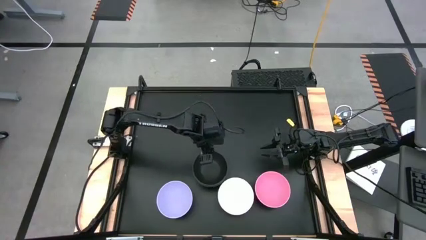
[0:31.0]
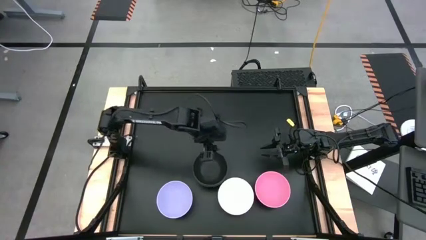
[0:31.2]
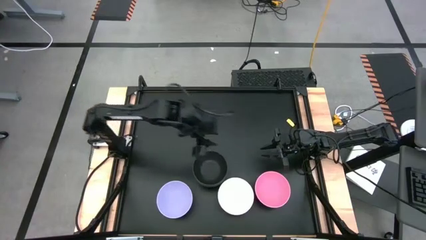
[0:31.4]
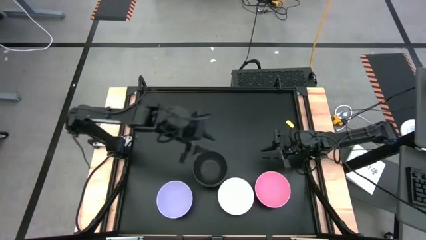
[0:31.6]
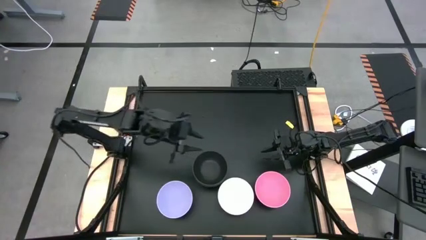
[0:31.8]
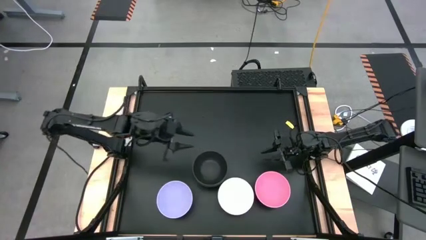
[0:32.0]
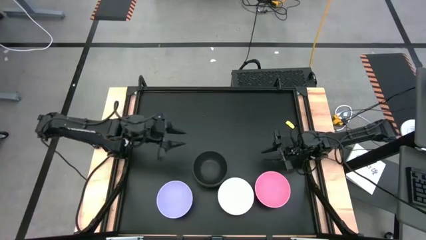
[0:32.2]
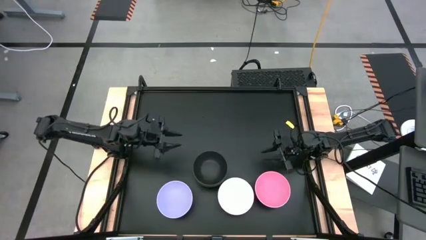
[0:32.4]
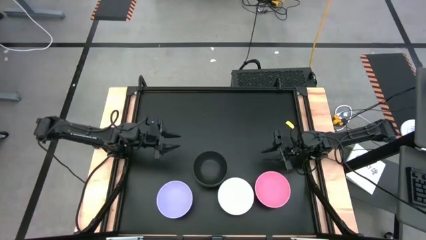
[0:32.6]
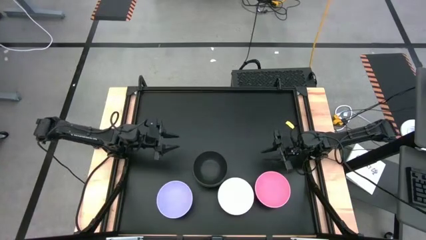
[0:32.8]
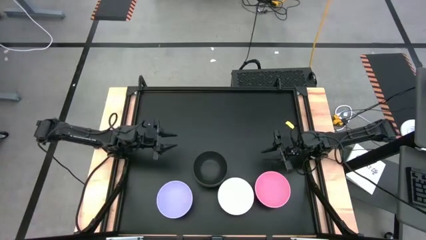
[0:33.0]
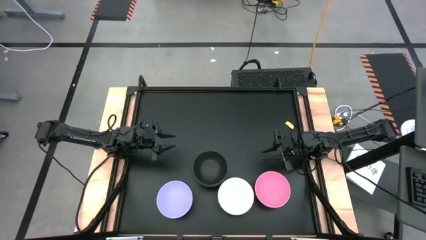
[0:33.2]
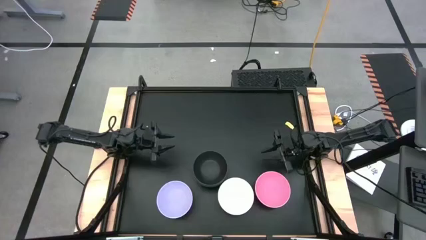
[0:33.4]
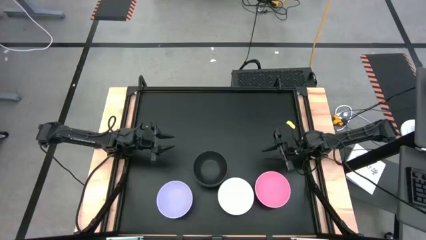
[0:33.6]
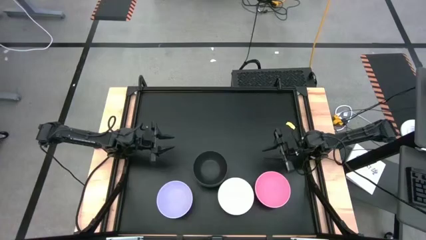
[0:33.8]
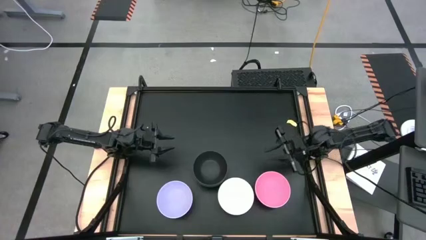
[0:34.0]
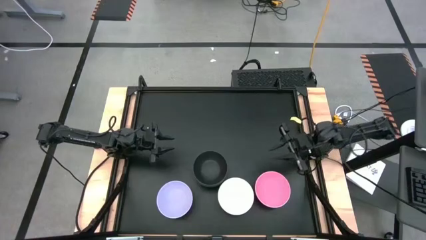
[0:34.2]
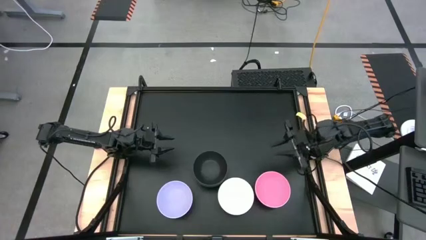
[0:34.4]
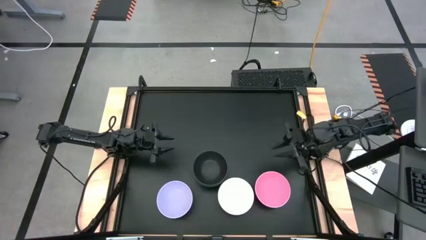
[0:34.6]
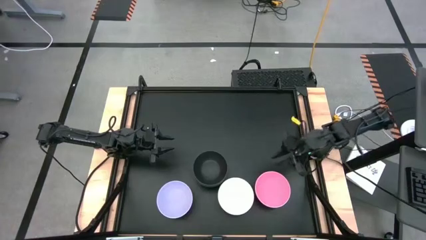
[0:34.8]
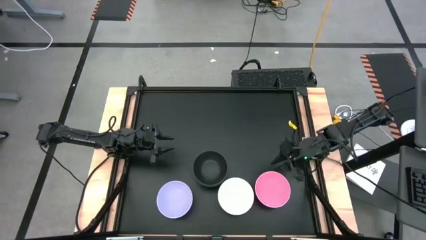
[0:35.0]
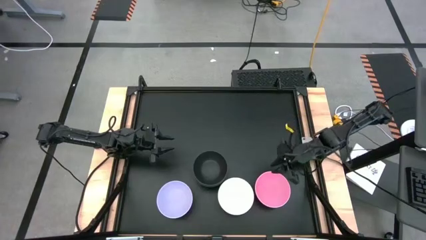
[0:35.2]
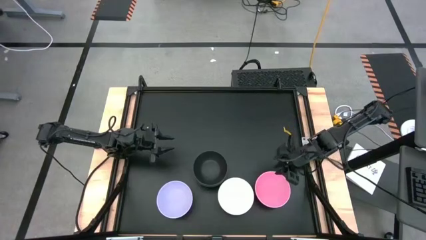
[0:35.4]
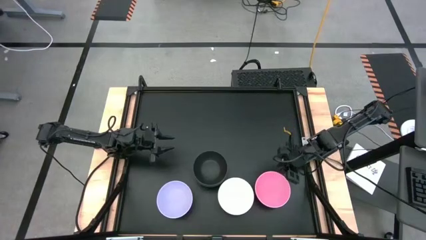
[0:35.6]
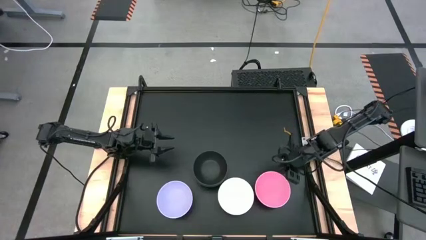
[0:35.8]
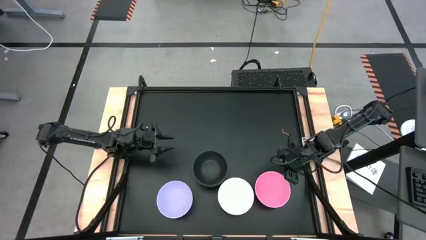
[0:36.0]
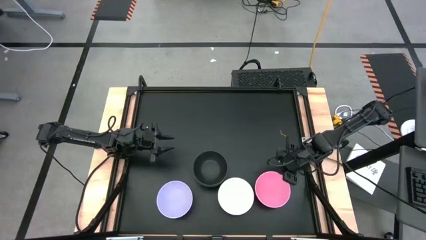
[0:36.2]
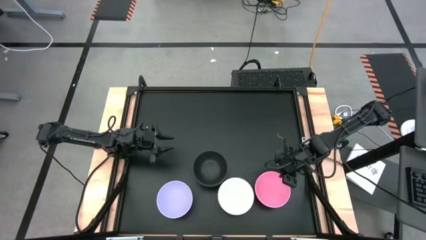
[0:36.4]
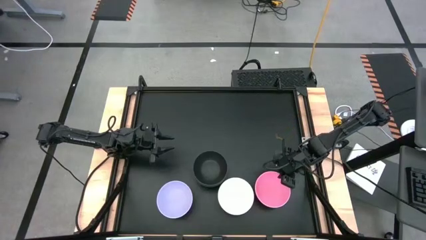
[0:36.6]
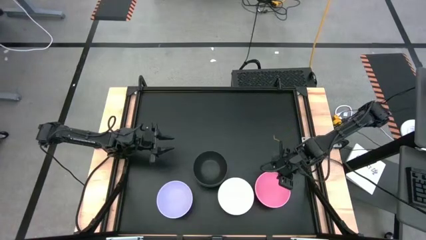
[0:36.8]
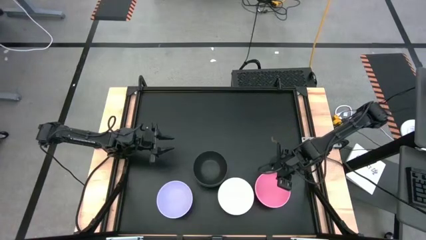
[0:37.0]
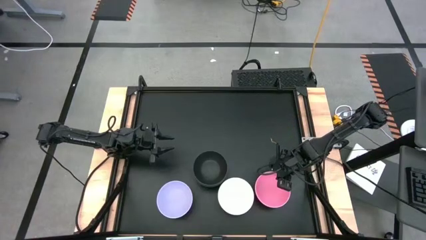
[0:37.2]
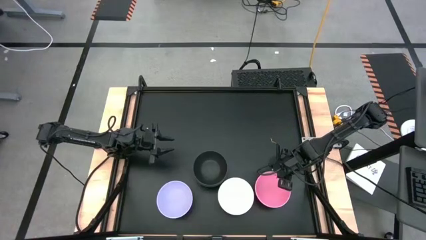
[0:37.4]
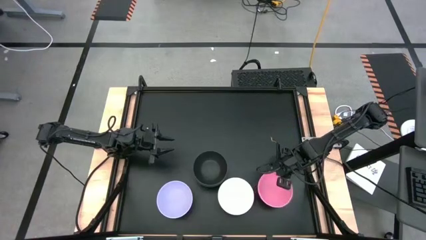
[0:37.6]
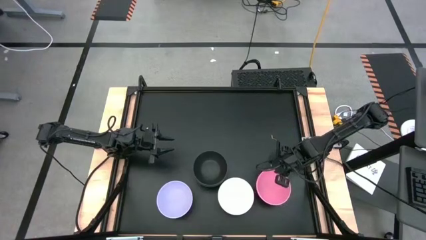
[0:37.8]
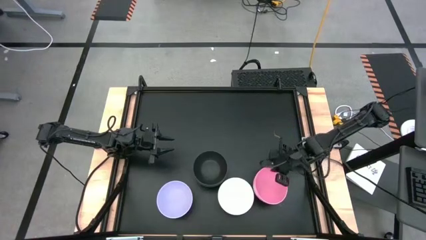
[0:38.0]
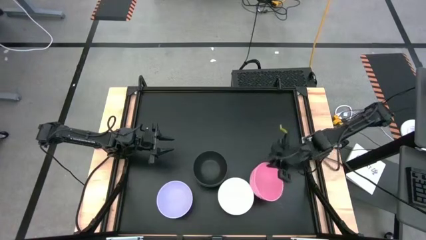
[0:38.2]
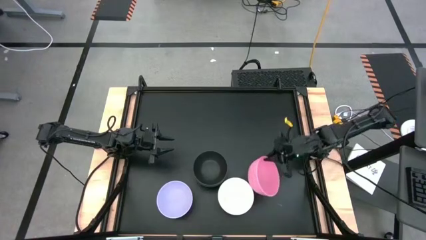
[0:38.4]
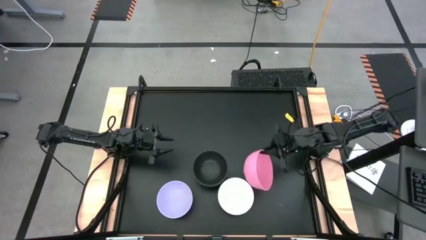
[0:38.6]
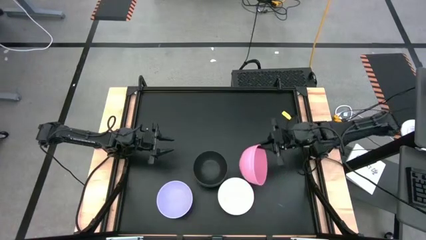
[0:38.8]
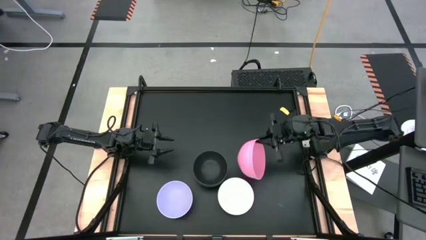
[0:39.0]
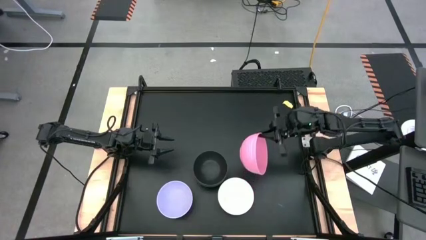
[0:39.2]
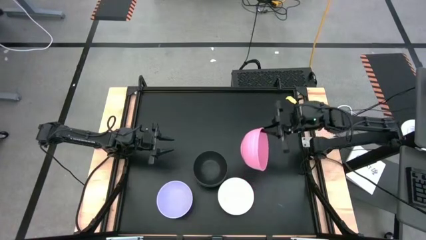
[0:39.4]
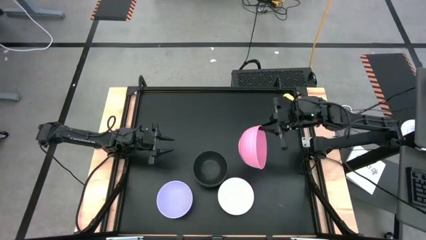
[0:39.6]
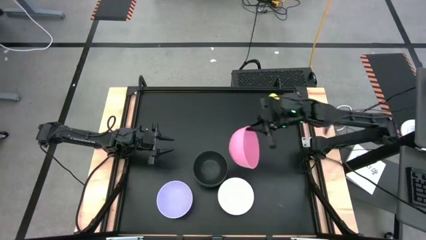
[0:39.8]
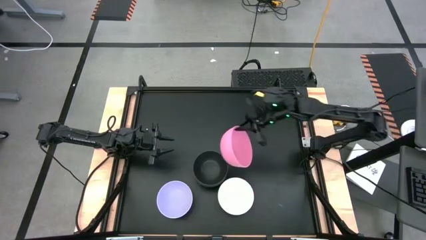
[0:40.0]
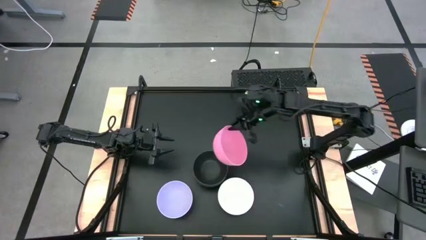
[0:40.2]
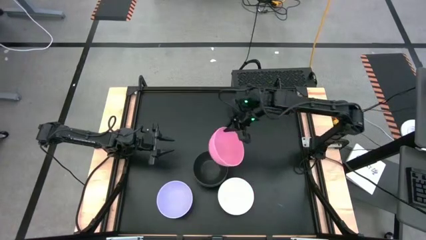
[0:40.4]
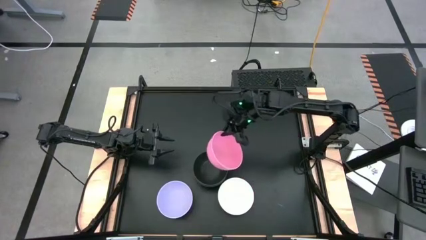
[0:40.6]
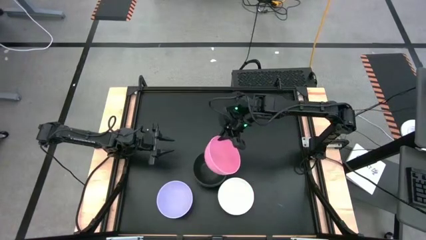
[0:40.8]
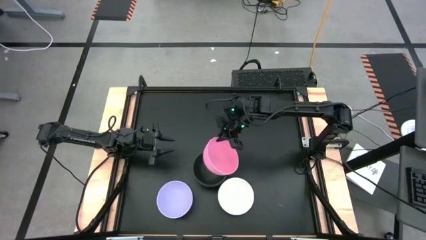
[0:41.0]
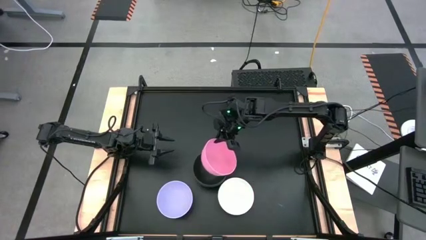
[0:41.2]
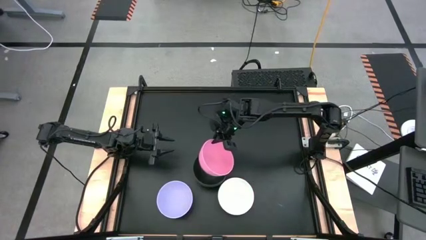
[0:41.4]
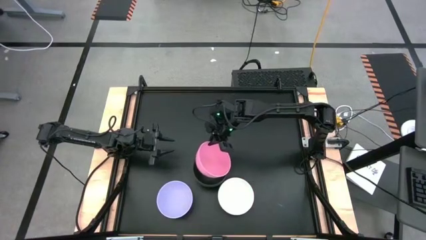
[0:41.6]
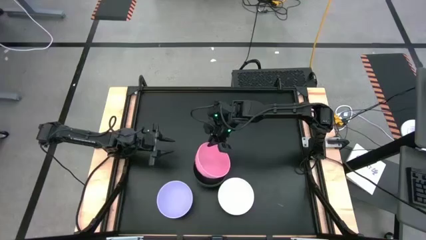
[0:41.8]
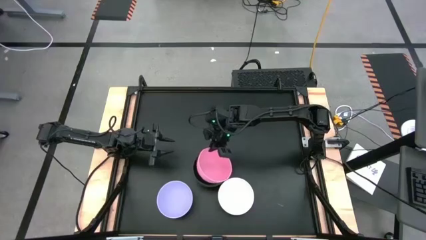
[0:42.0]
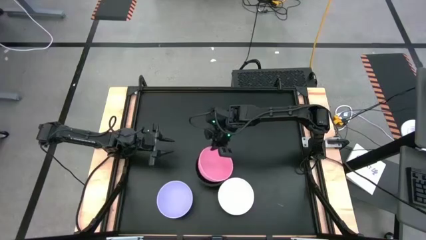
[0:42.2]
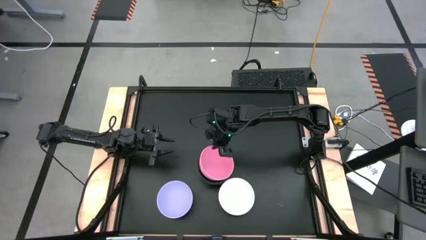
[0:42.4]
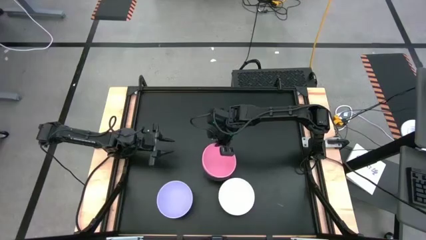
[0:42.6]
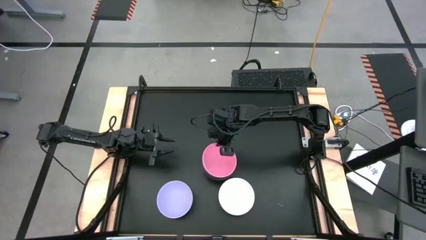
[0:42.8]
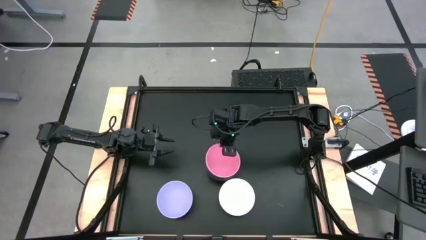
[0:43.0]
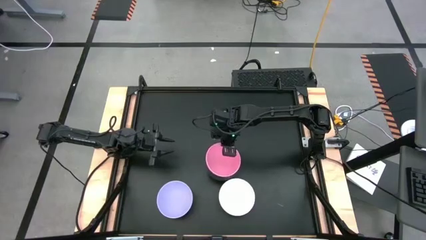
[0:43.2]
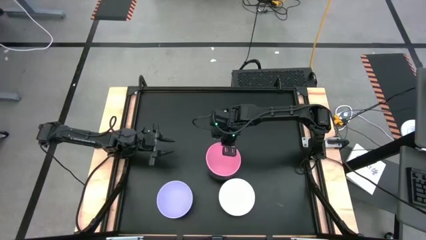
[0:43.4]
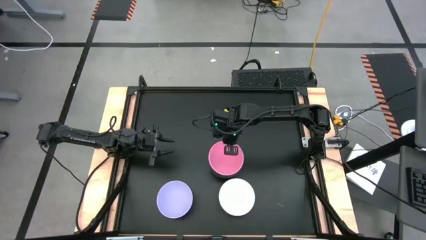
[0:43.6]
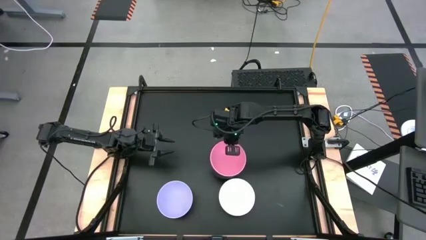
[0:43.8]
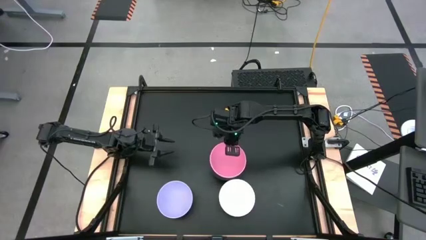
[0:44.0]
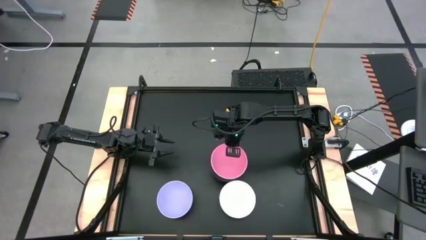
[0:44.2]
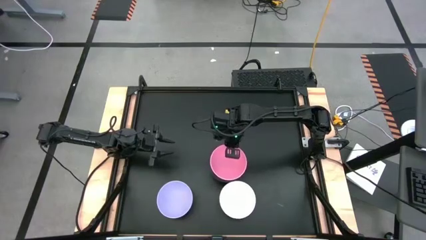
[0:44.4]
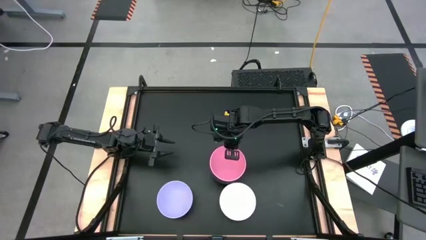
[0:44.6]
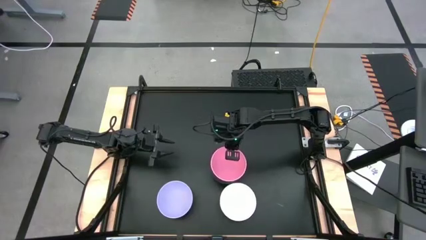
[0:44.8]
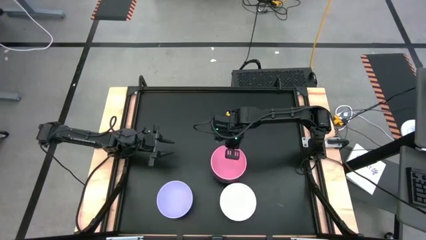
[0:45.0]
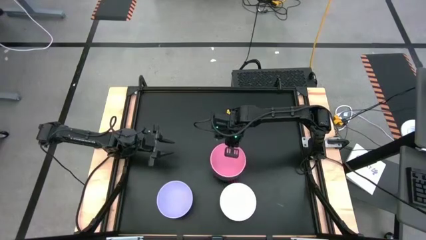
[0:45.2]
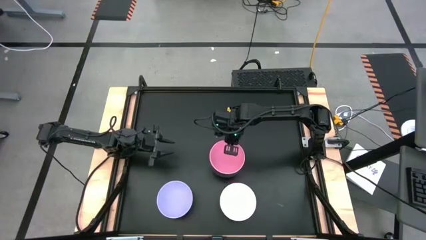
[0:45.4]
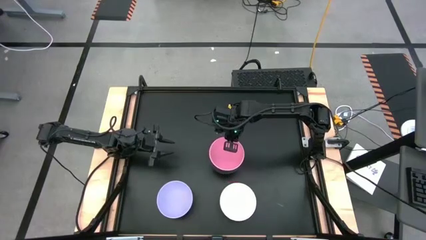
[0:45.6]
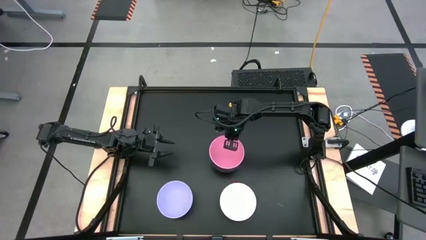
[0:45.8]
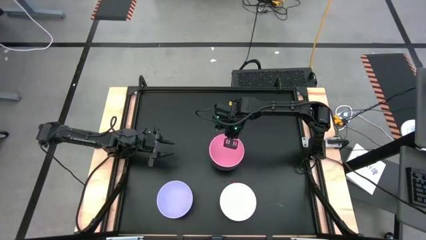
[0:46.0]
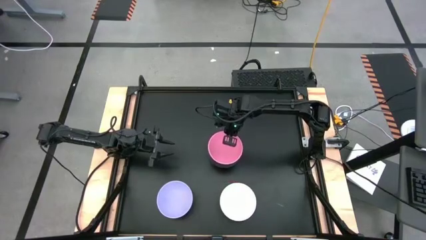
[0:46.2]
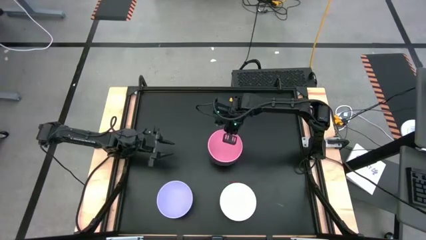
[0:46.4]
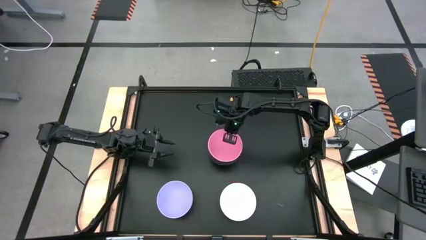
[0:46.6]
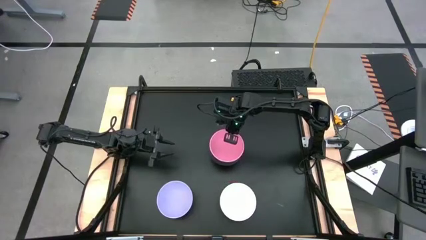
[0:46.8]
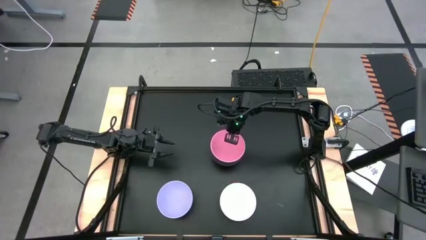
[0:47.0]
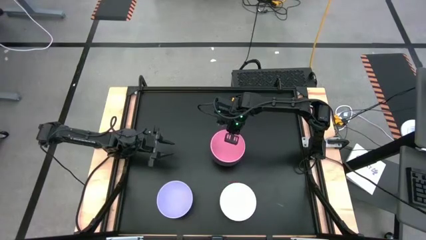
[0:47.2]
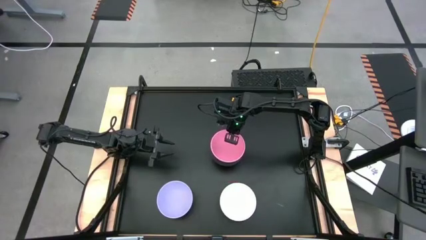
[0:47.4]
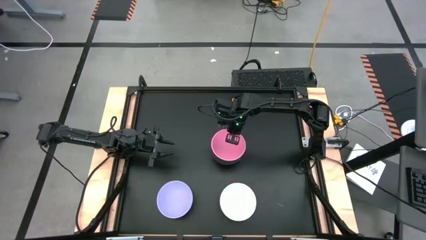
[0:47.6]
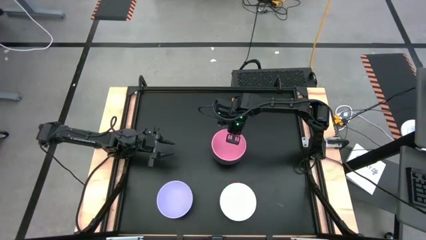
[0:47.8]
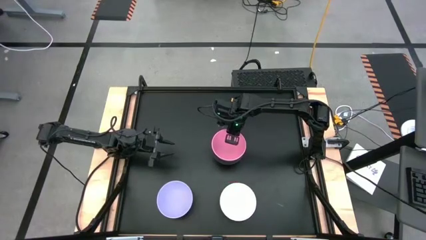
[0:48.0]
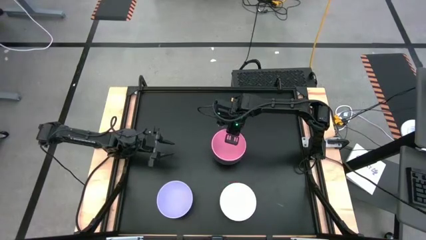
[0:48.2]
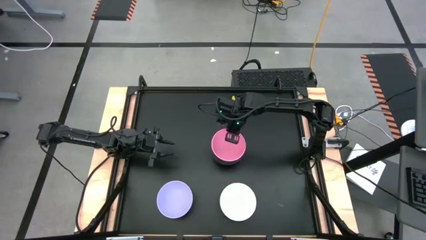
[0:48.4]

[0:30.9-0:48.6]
Task: Nest bowls inside each other
Stack the pink bowl on top of the black bowl
